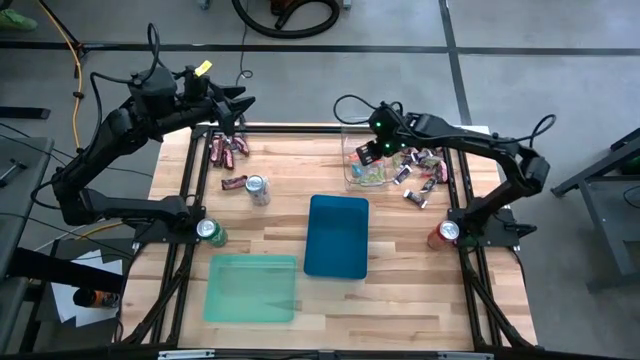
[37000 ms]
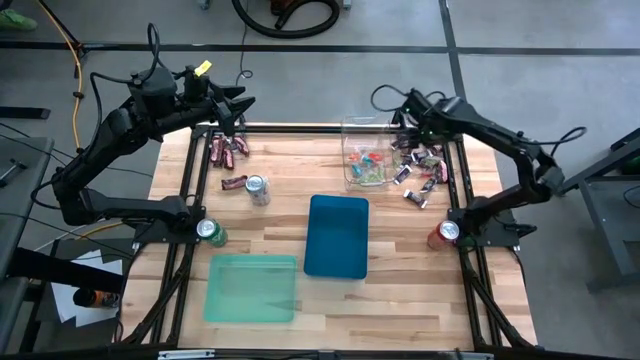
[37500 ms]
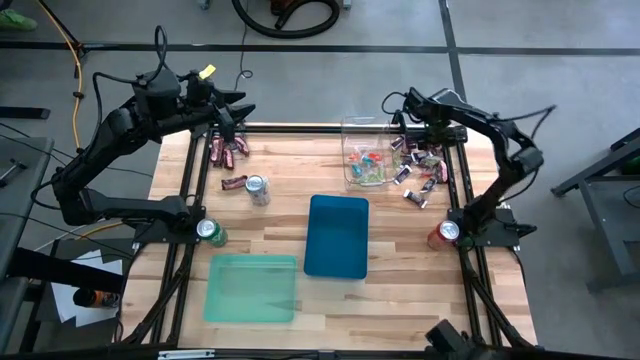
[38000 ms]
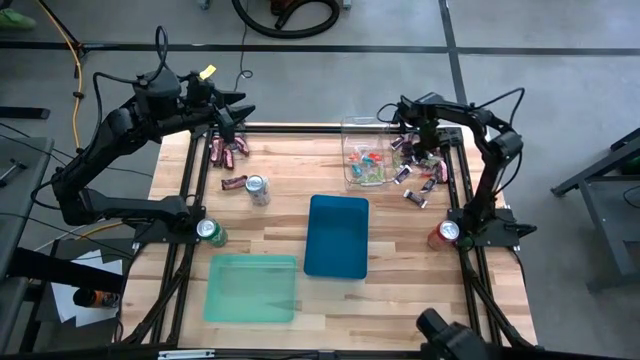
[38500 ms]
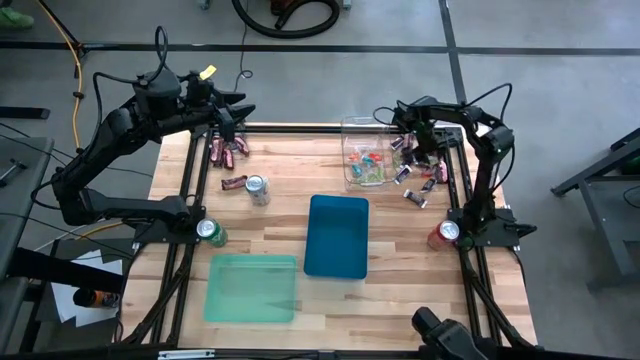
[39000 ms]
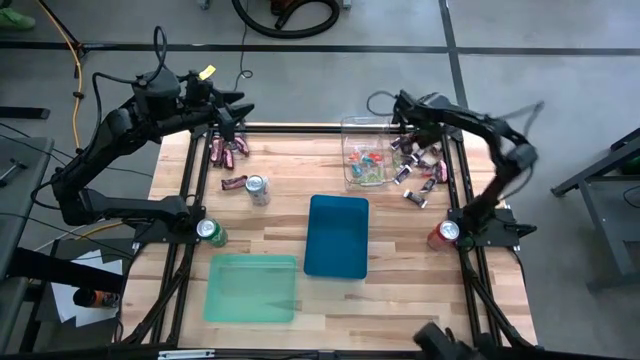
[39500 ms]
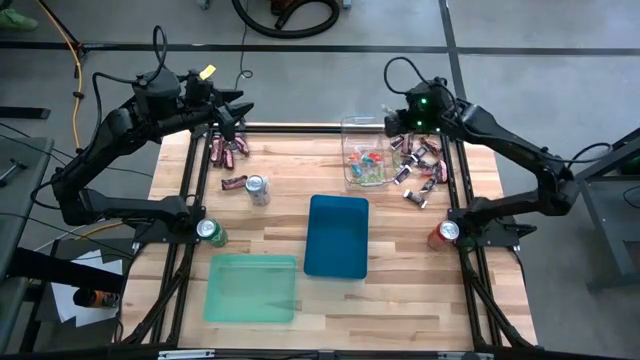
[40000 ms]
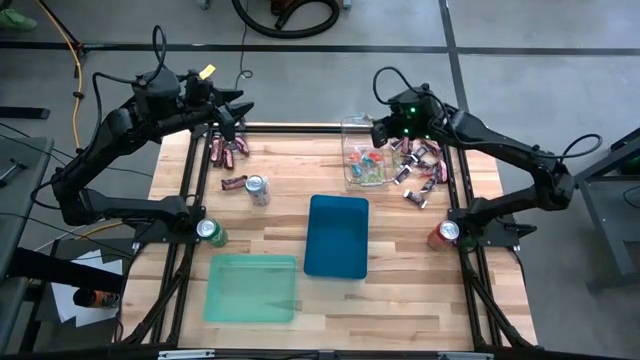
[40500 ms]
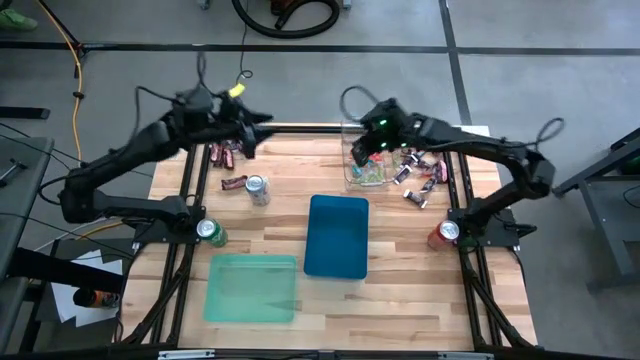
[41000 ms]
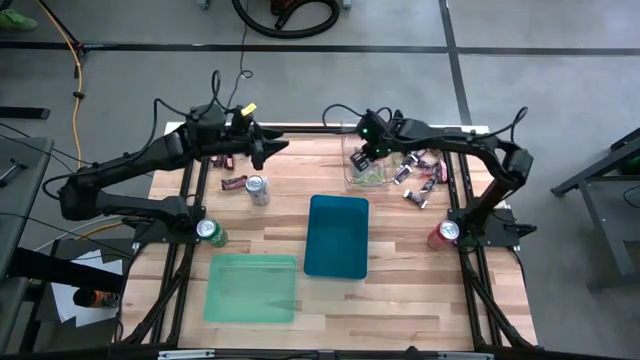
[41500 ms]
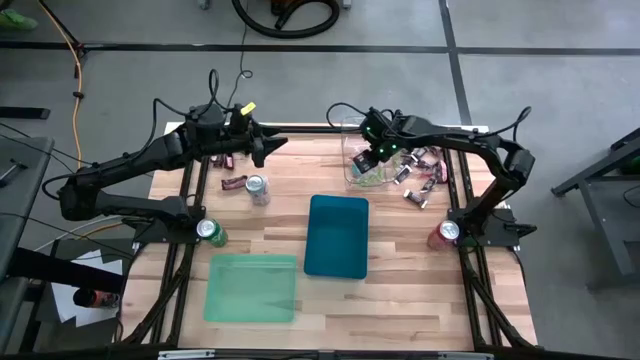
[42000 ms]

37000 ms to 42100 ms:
Task: Sort candy
Put the green gummy into the transparent bin

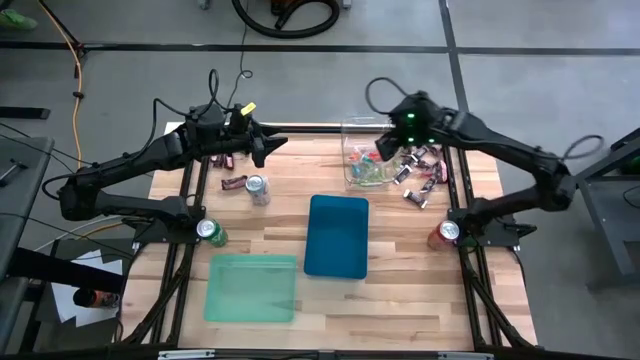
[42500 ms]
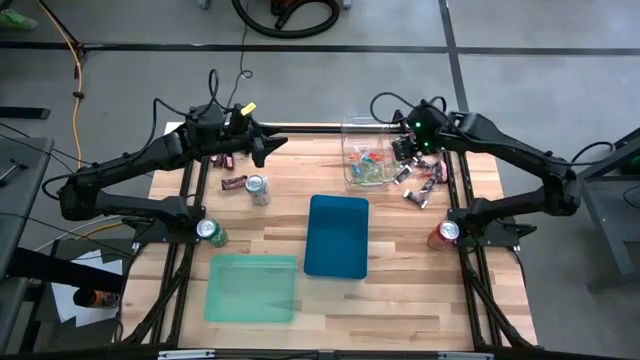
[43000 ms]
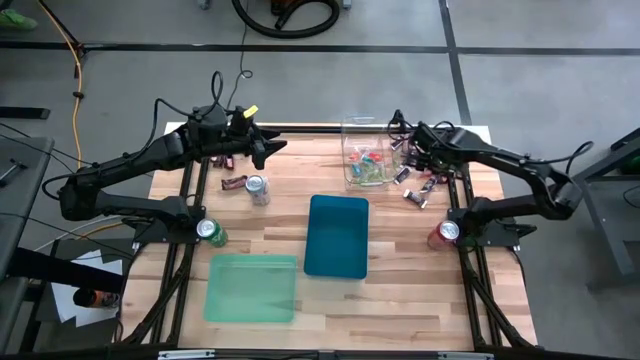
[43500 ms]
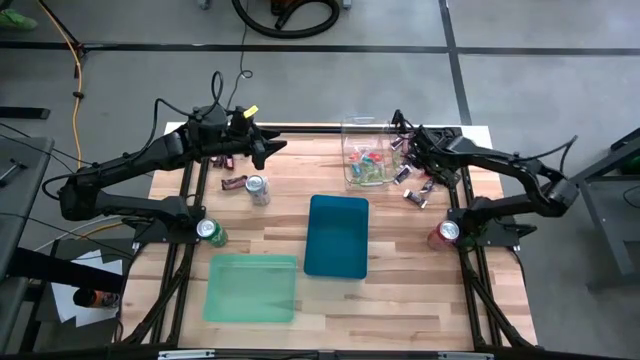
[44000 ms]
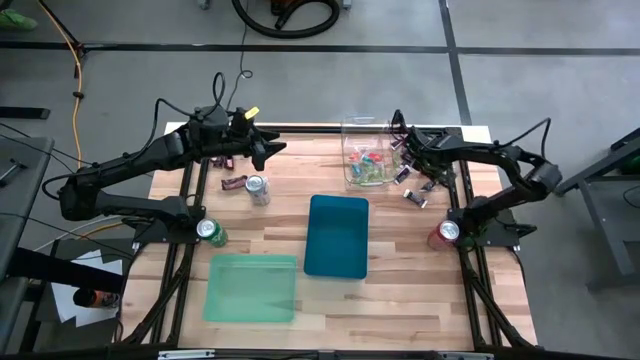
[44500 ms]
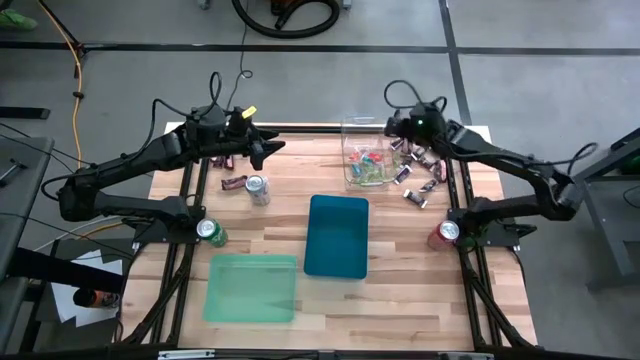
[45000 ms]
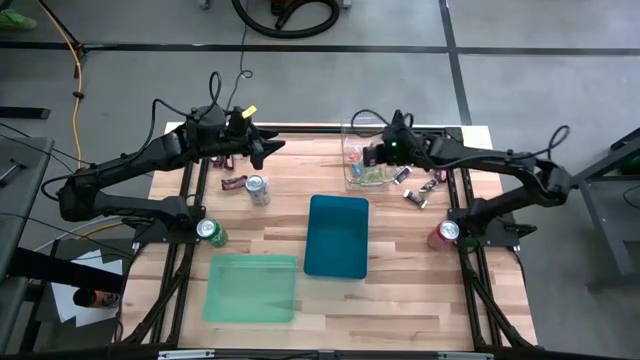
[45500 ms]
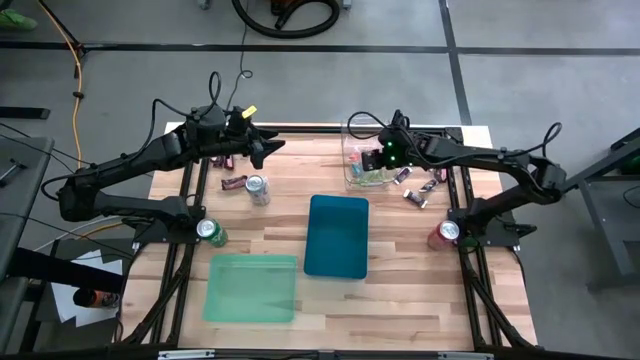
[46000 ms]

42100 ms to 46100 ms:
Put the red gummy into the transparent bin

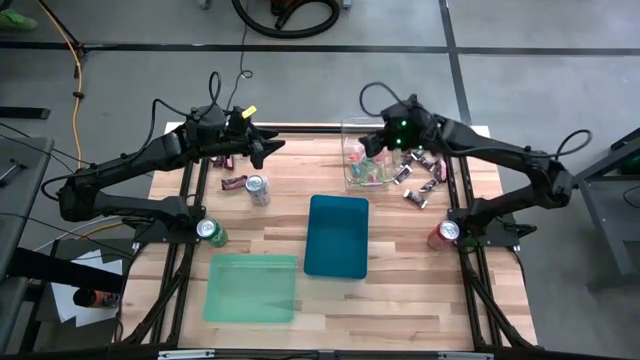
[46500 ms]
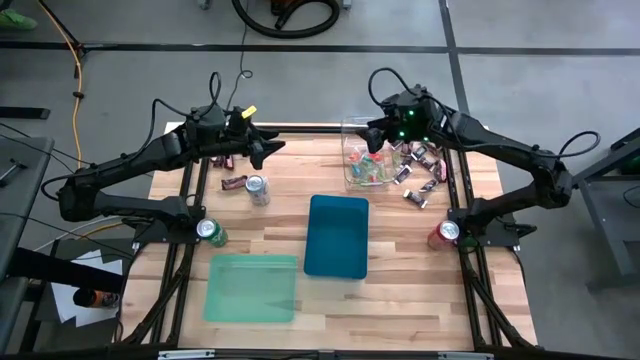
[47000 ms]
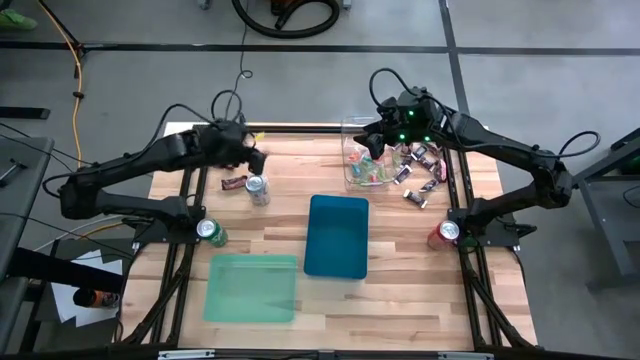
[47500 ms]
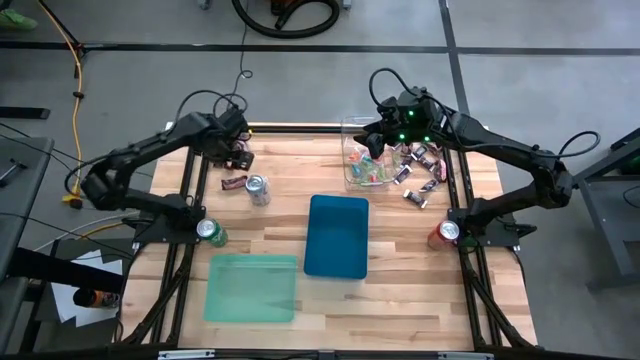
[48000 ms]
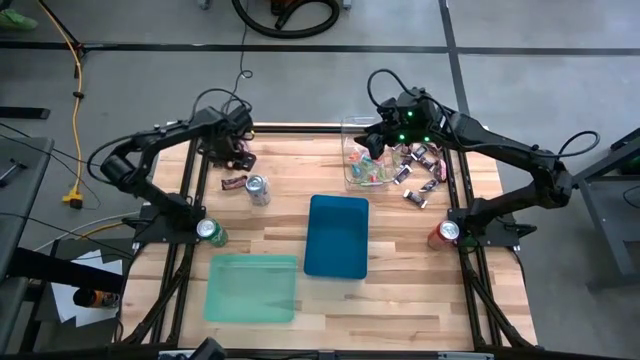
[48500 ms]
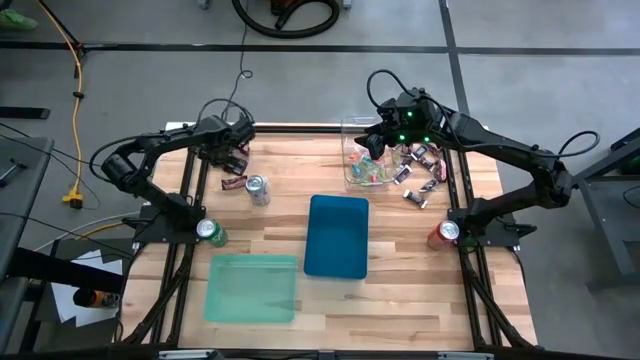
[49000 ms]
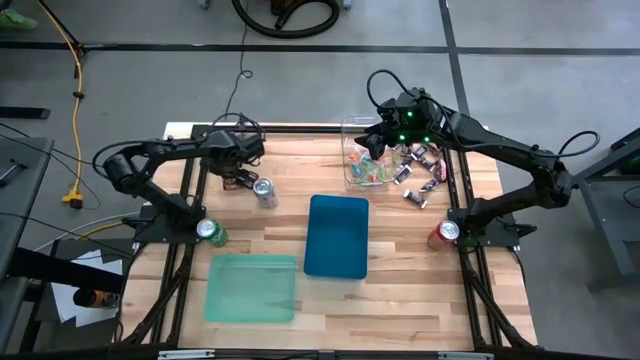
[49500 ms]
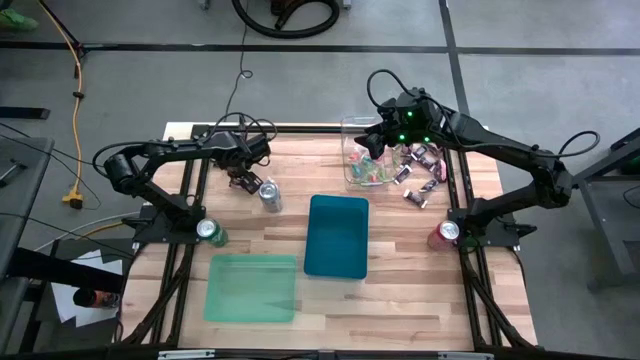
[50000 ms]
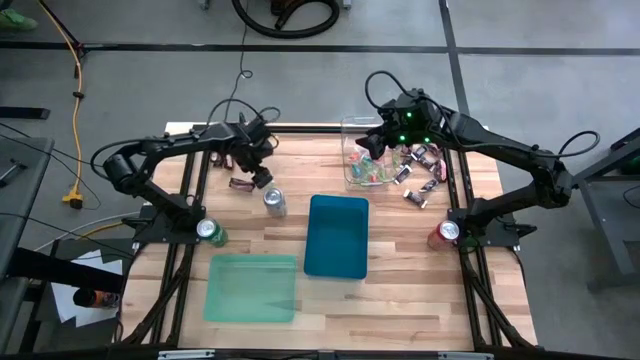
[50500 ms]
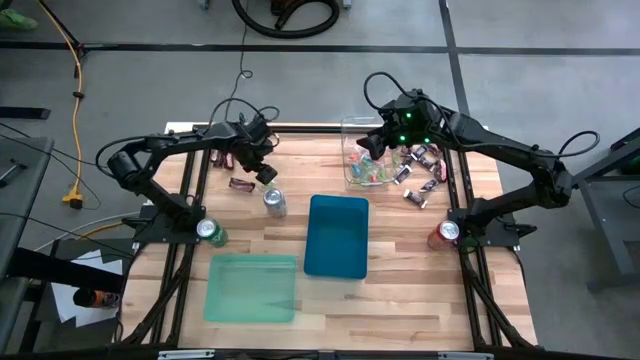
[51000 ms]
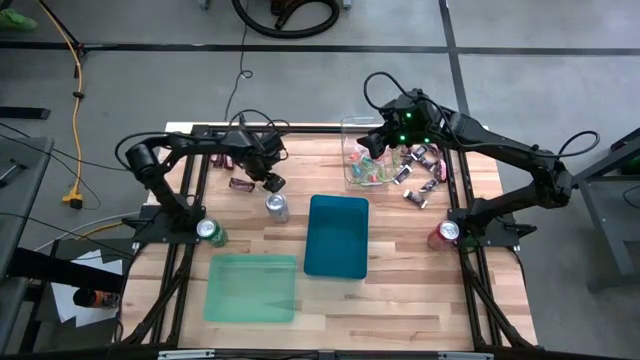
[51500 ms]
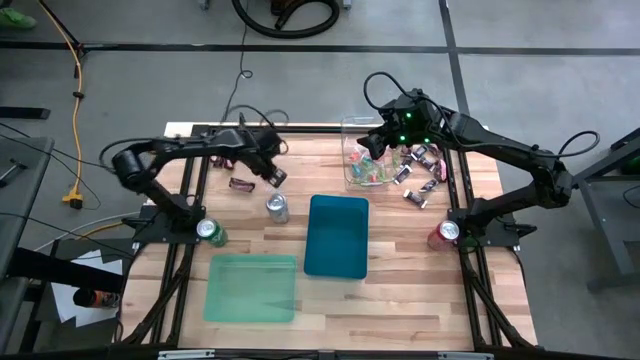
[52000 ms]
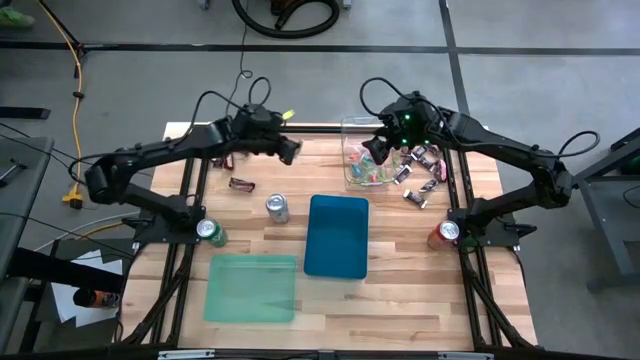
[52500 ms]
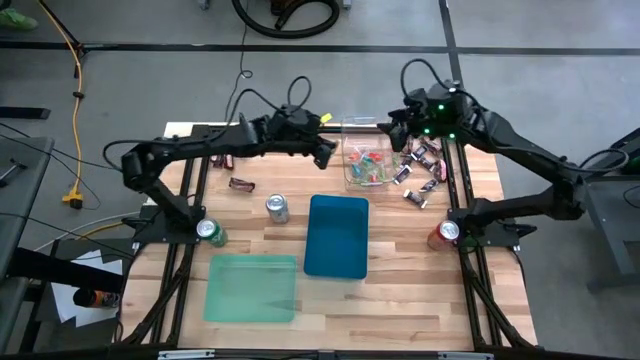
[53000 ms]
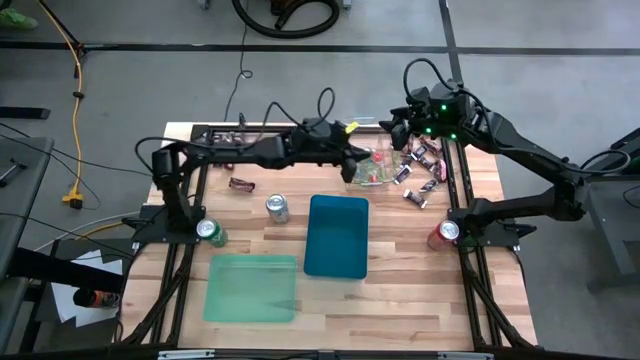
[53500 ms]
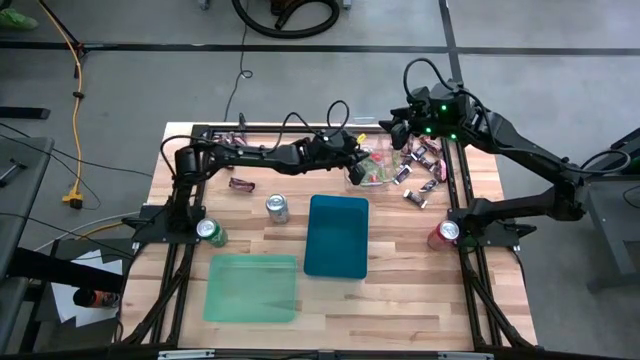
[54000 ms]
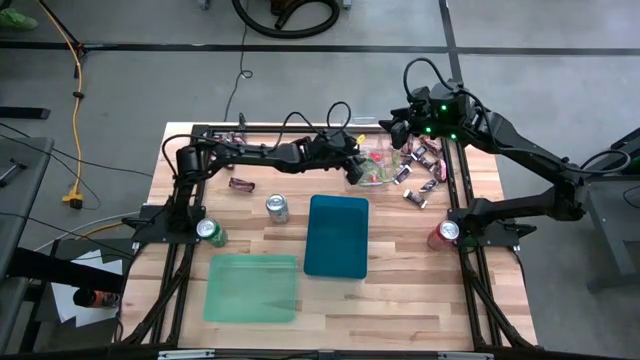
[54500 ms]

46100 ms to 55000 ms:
Put the green gummy into the transparent bin

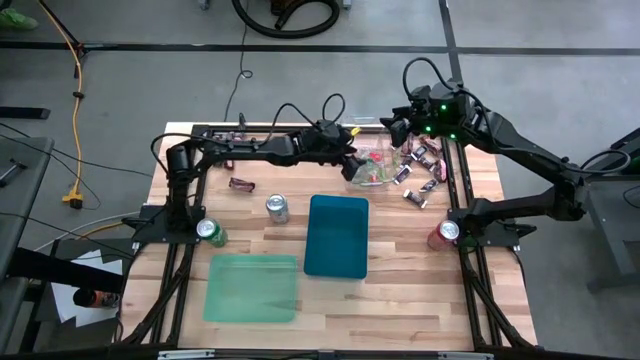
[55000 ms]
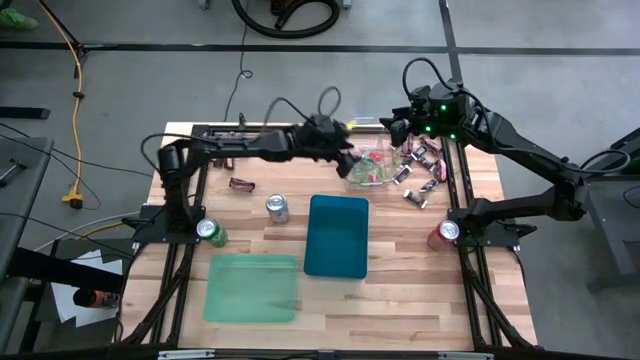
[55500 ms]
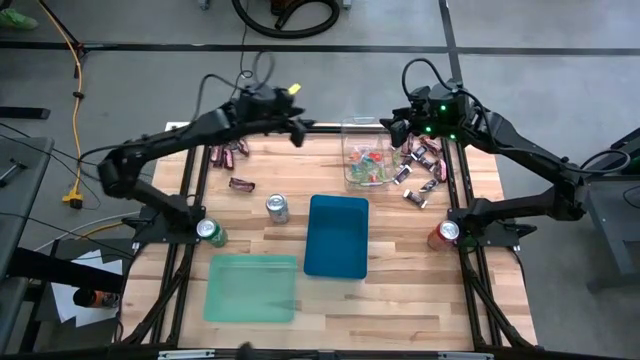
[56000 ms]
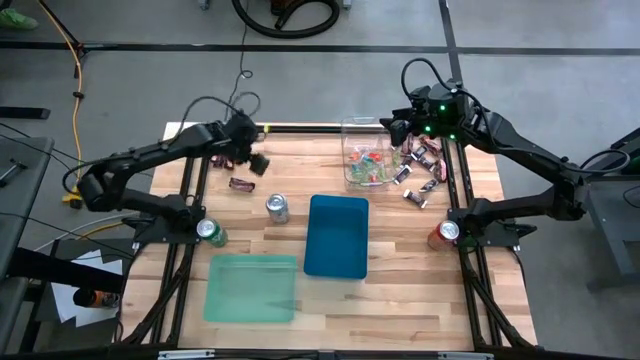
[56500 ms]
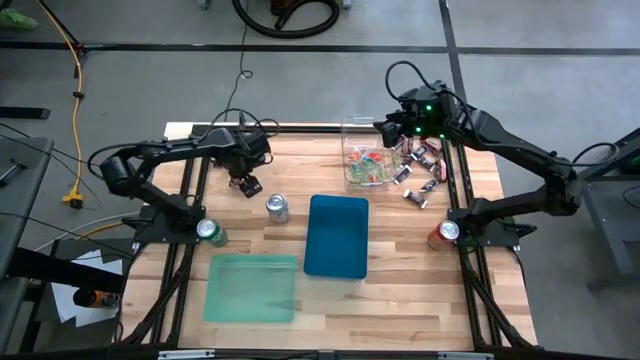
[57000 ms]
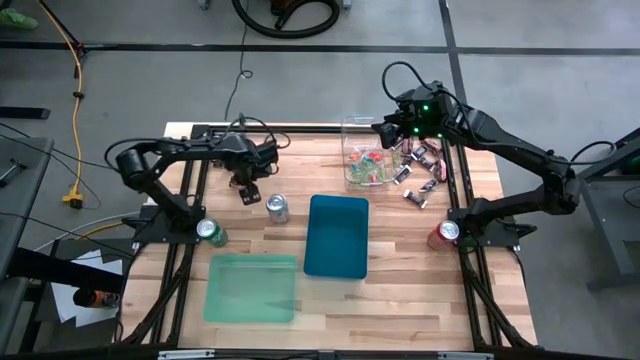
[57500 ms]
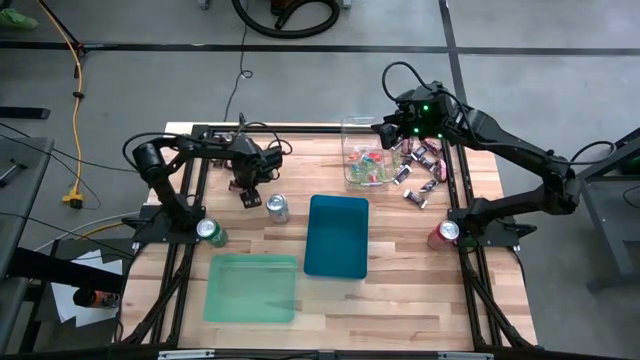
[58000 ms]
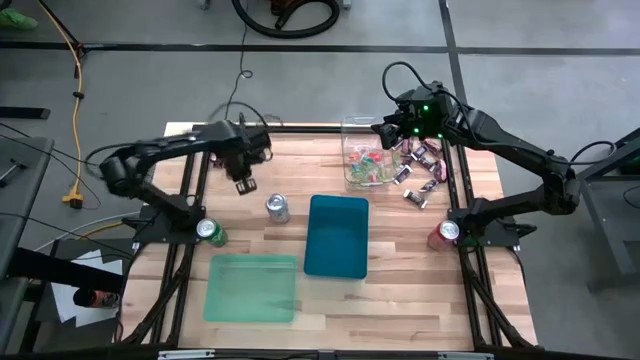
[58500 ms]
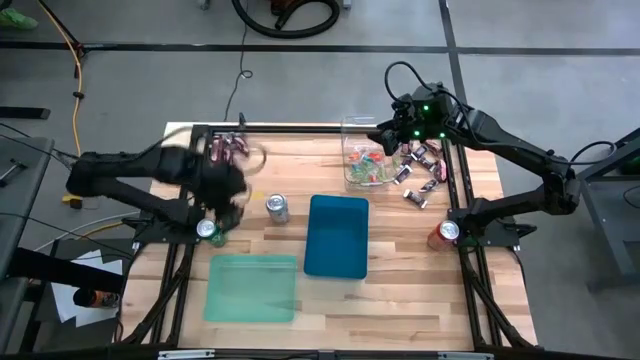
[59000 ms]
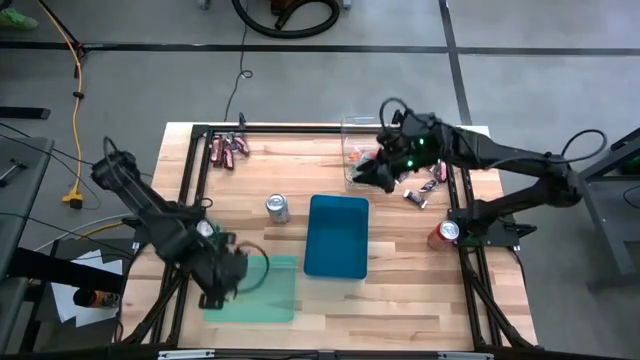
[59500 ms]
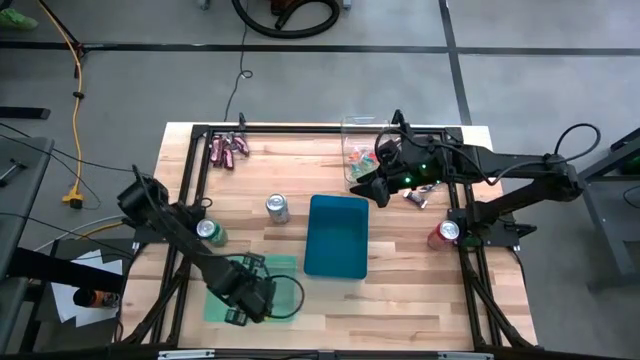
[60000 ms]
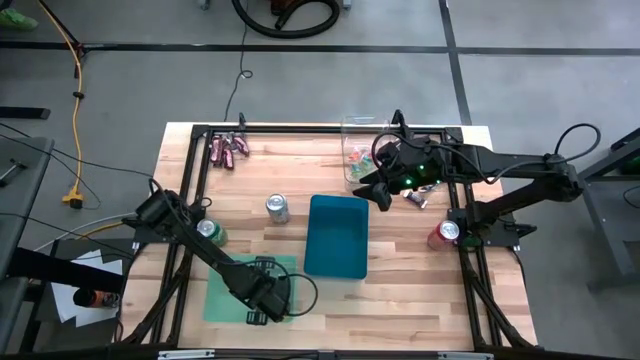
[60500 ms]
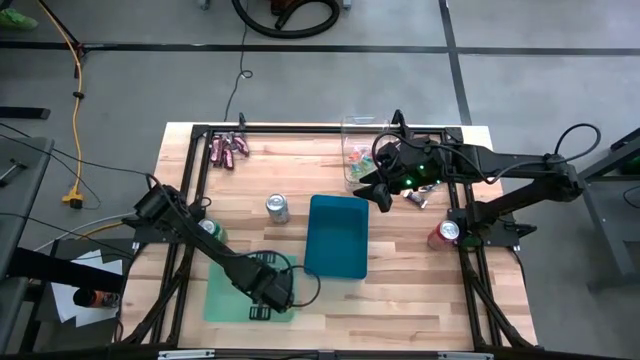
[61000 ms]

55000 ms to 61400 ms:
Put the brown chocolate into the green bin
